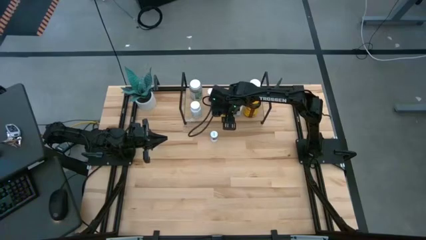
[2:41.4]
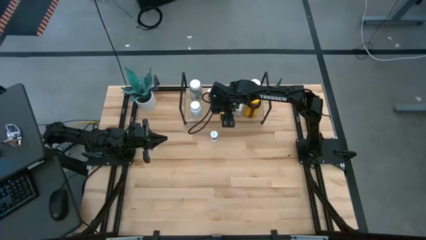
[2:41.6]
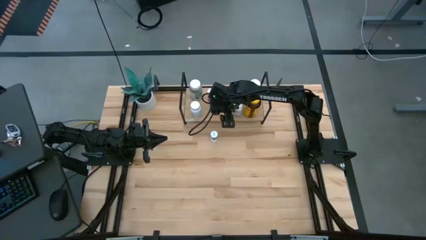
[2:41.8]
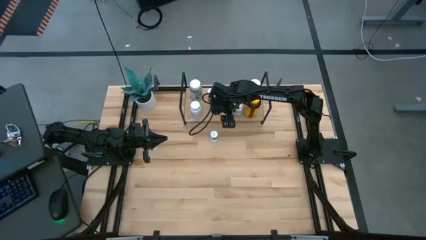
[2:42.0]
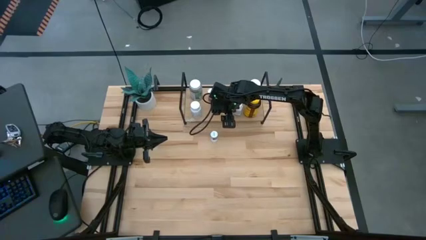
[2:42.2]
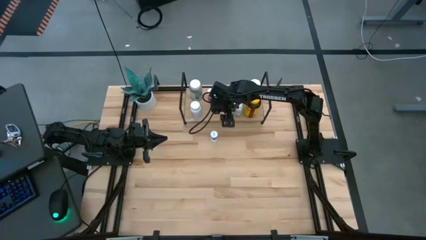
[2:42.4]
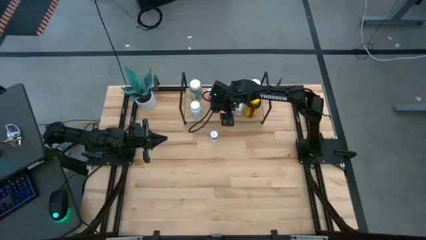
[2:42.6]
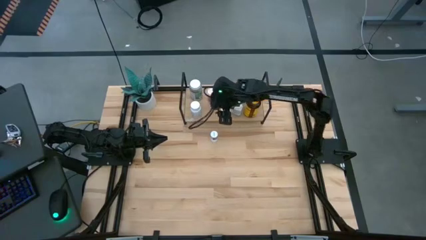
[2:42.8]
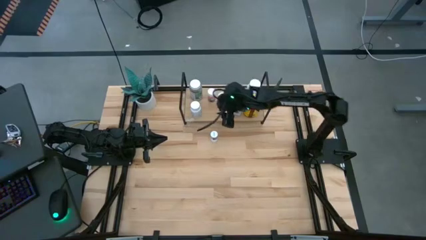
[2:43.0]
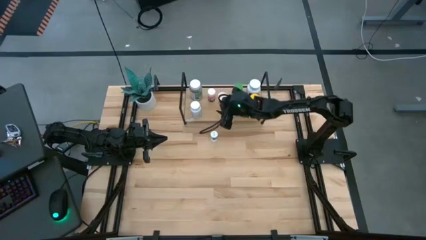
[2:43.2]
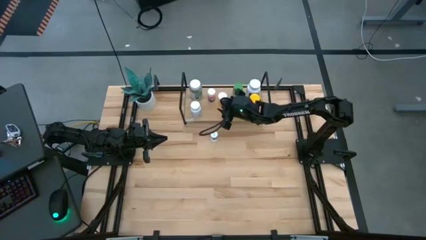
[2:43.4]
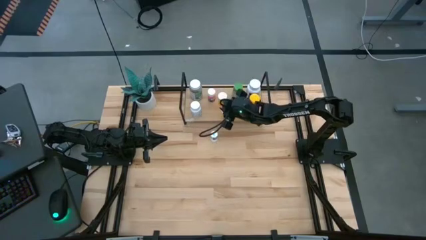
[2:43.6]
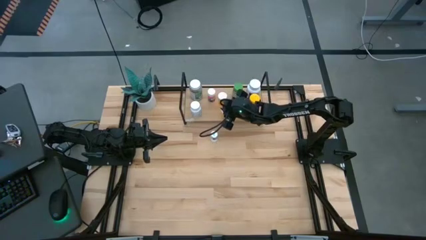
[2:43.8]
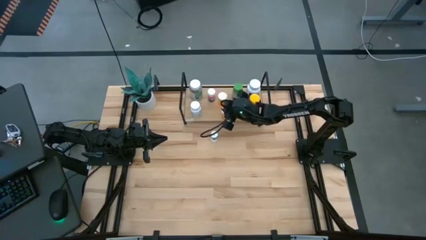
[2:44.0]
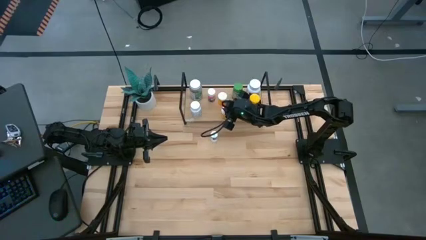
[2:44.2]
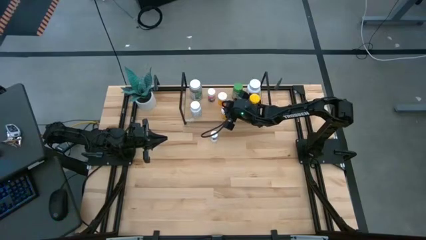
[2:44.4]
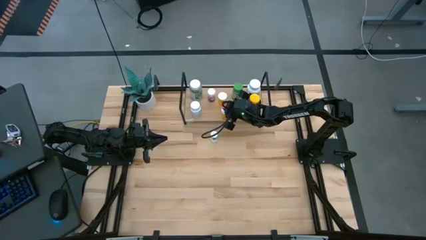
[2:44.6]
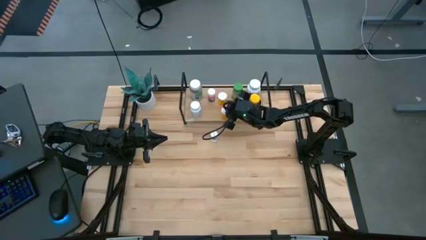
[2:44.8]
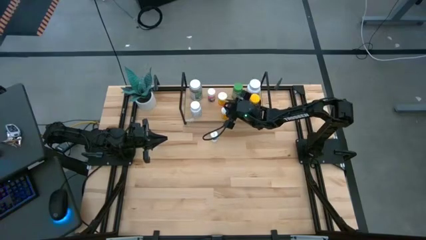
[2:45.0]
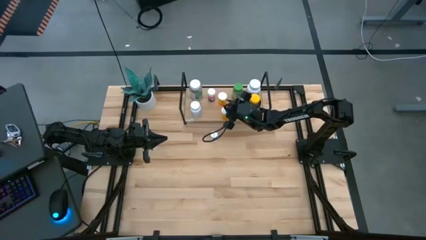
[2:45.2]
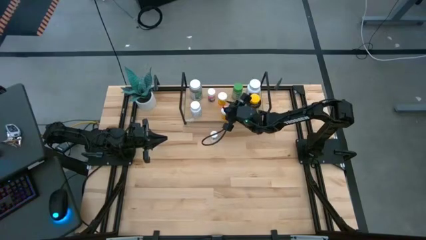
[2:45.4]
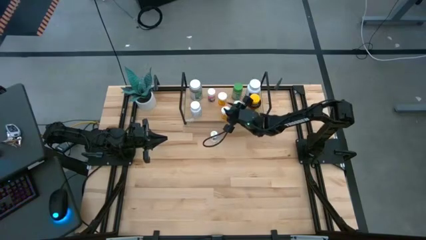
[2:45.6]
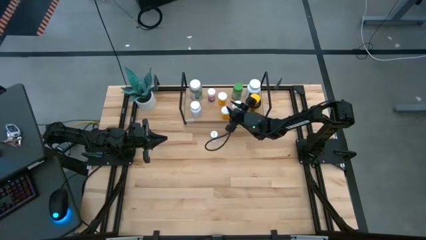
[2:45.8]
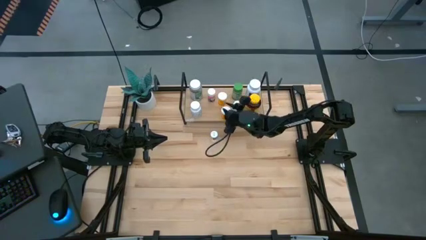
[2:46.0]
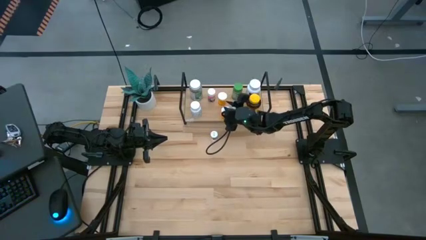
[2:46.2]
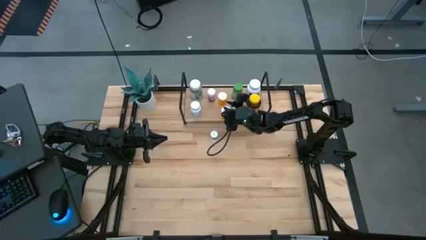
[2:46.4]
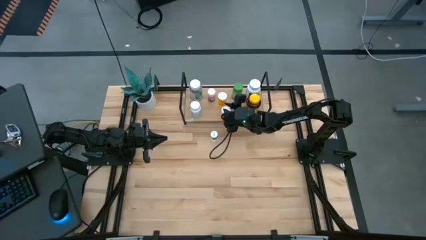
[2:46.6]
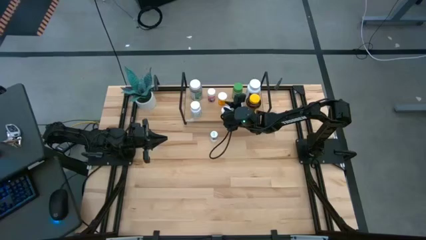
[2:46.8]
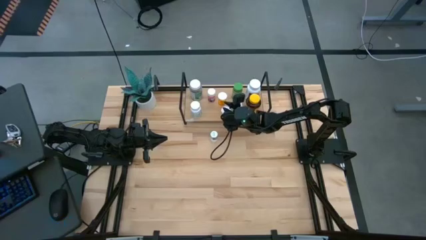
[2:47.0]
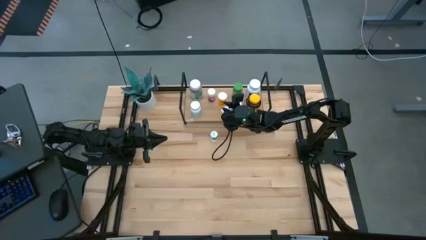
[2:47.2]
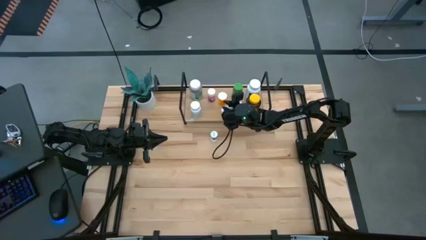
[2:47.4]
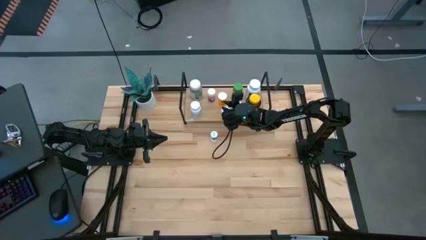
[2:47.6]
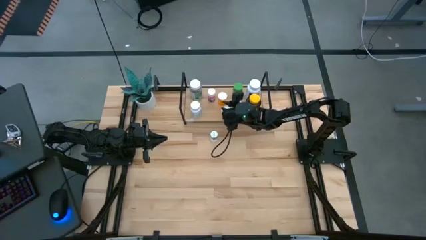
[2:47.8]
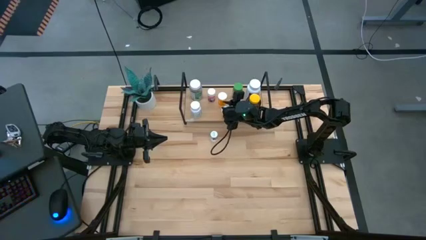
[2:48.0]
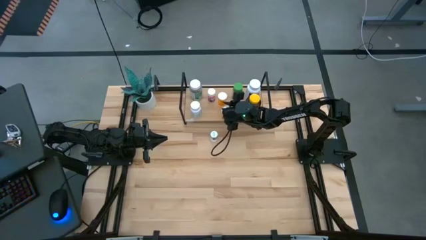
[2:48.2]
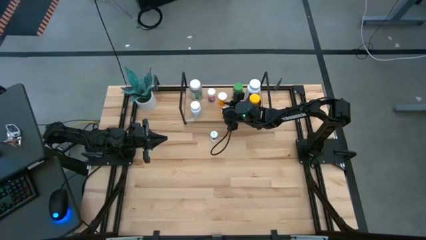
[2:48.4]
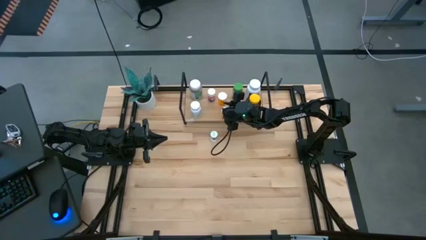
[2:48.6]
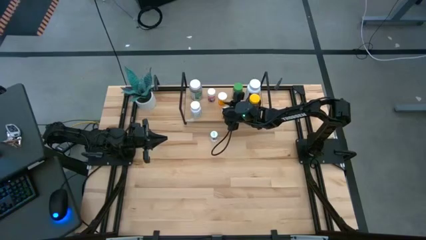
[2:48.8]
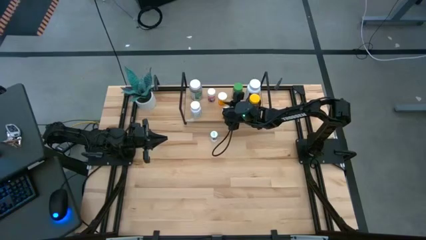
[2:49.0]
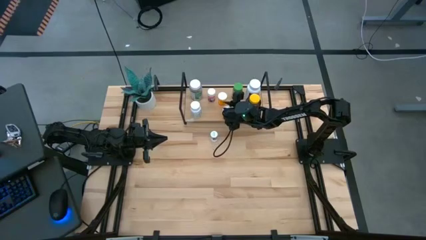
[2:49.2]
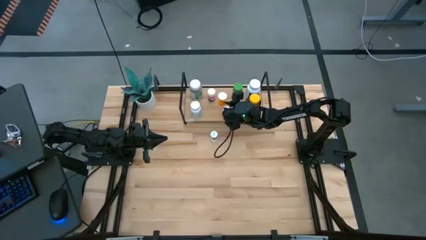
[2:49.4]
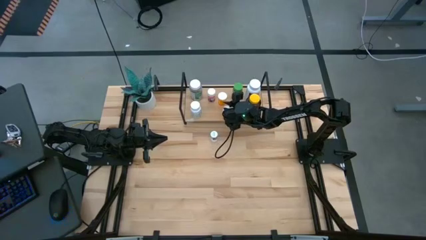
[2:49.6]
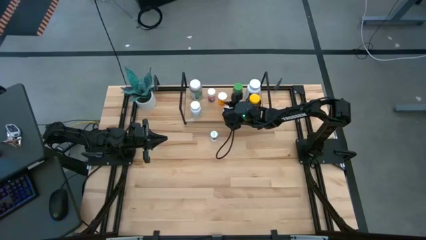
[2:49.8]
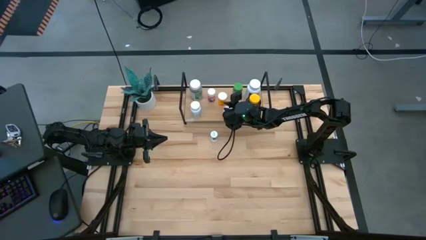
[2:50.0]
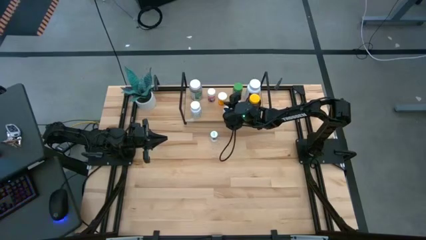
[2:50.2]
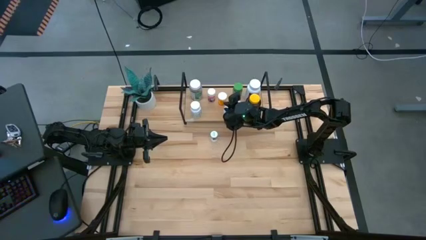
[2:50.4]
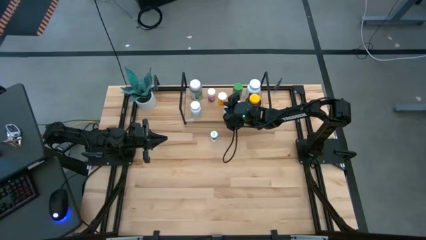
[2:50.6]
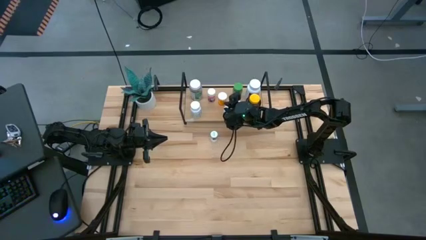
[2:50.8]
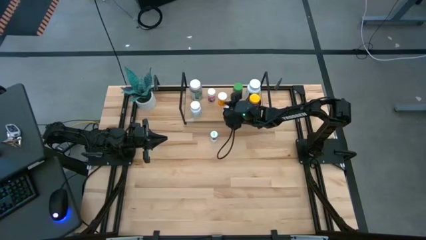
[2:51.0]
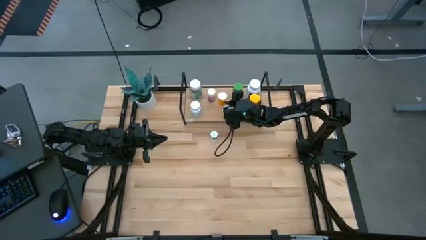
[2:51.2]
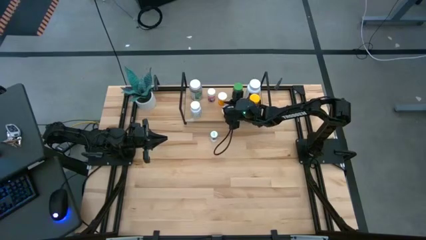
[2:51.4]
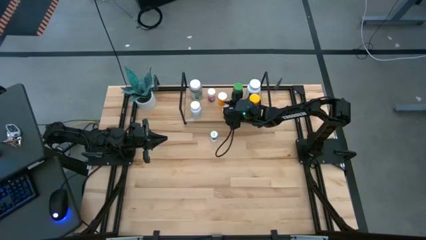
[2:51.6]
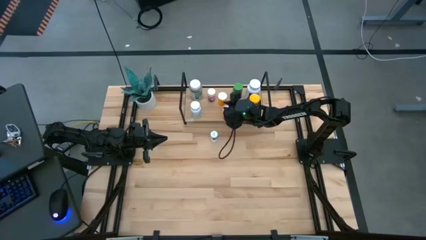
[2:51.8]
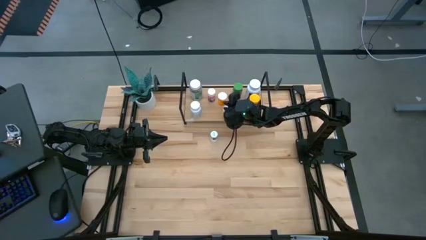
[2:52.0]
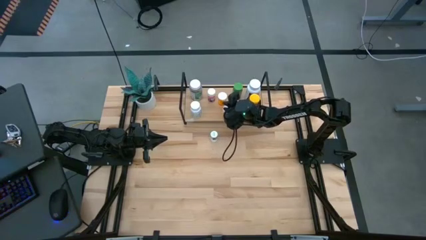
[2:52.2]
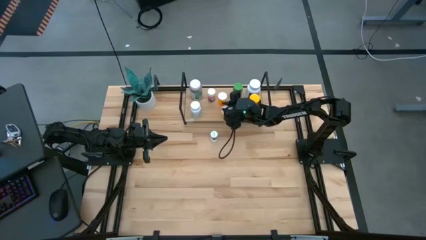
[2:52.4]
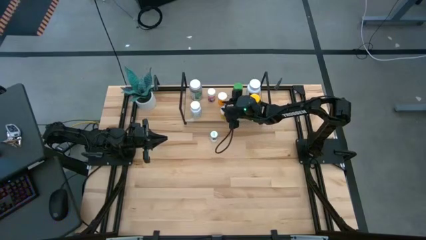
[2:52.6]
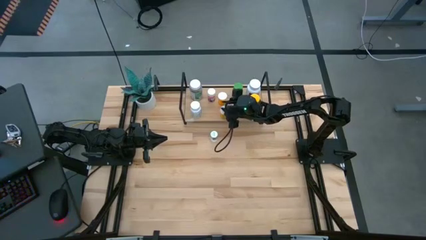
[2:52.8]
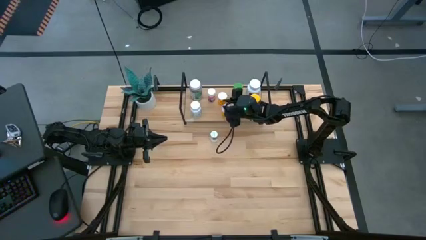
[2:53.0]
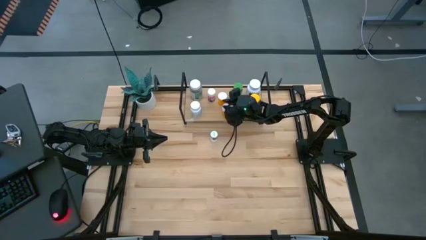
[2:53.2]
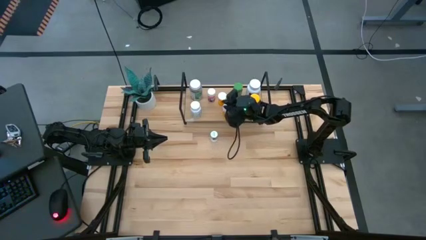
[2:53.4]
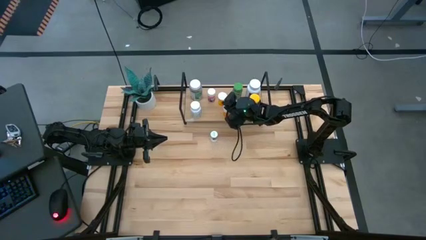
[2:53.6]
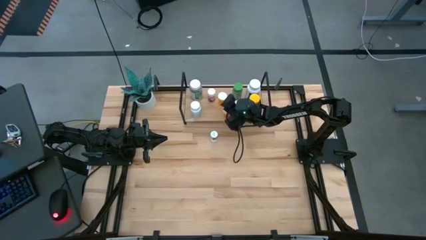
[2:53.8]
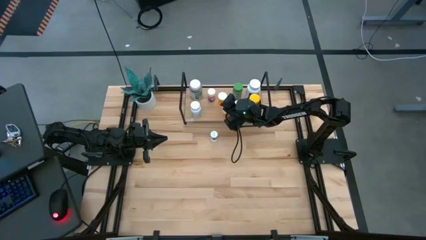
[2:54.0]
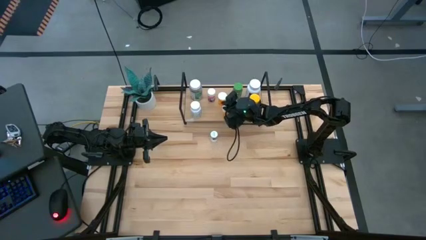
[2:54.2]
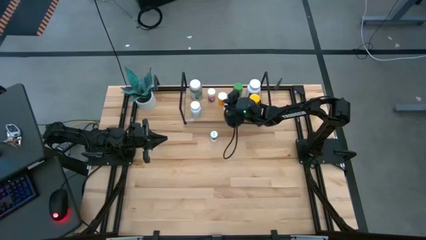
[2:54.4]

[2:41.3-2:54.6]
Task: Pick and place medicine bottles onto shelf by color
Close the yellow pill bottle
